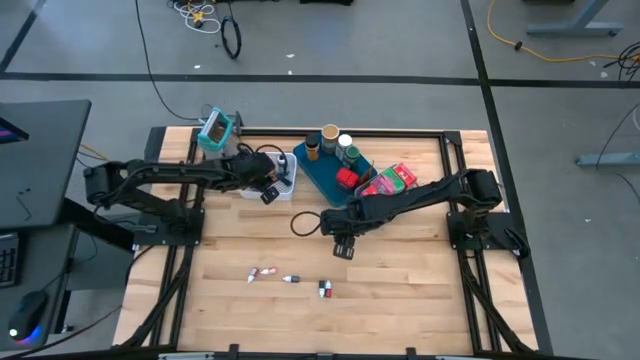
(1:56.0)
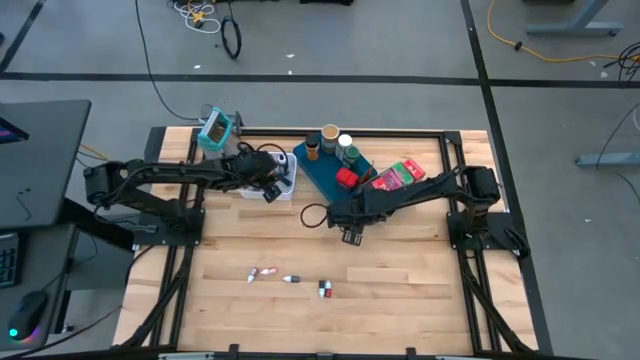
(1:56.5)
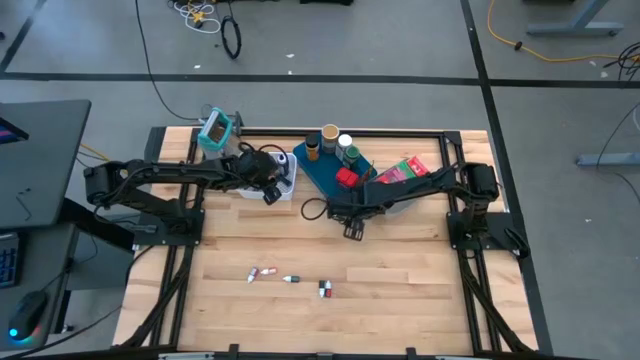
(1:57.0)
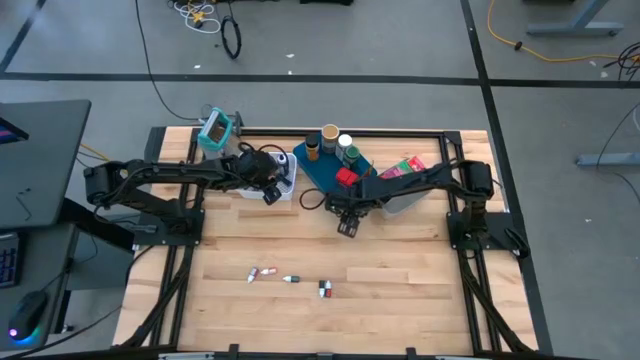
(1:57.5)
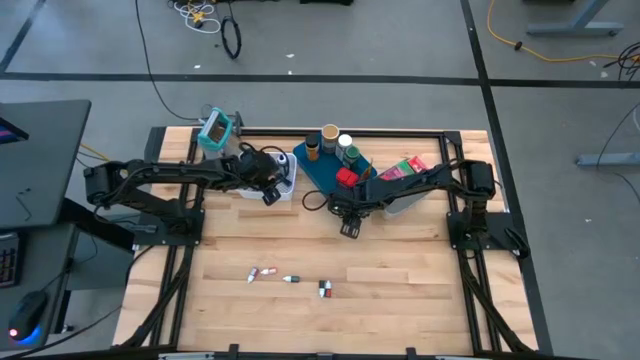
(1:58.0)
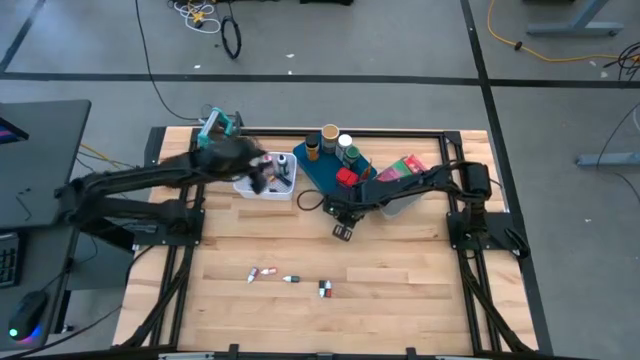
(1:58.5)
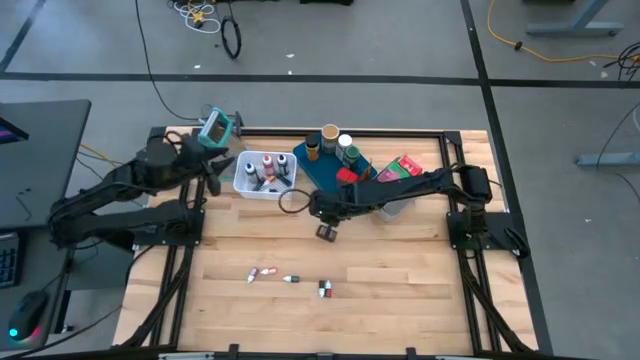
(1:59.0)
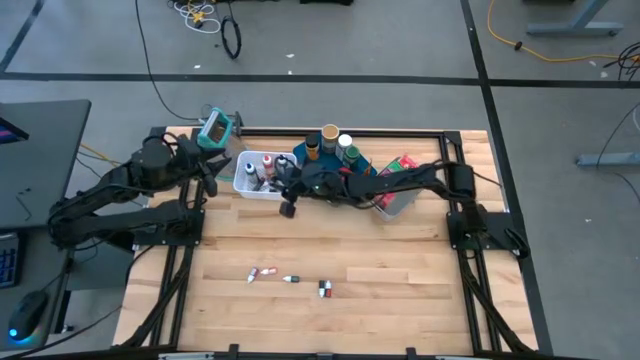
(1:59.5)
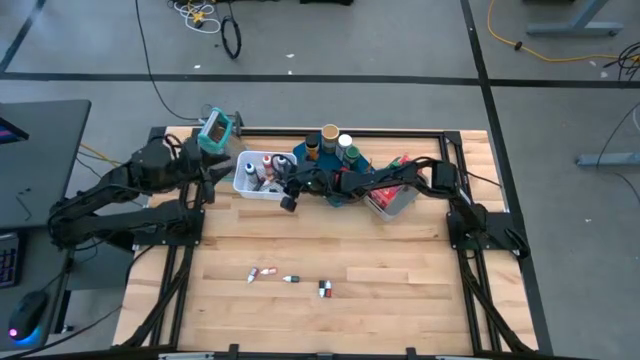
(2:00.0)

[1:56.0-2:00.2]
Task: Pick & Place Kitchen Items
Put the brown food coloring bottle into the white bin

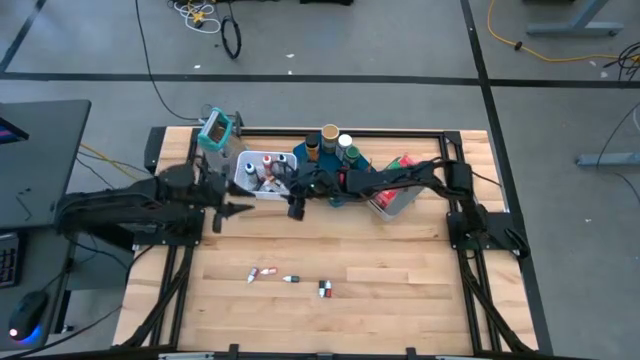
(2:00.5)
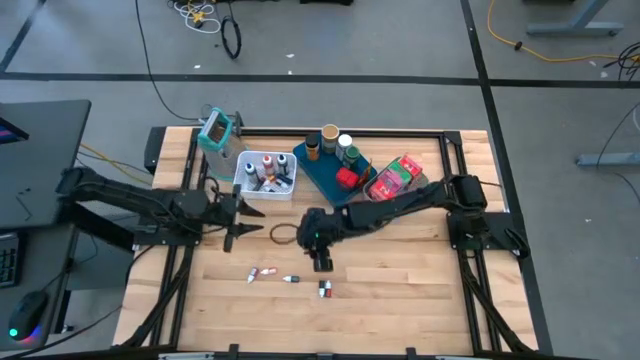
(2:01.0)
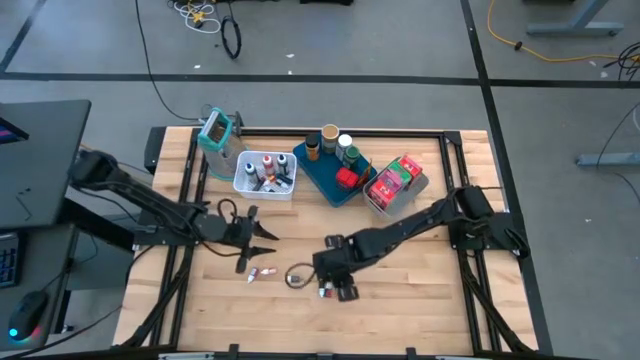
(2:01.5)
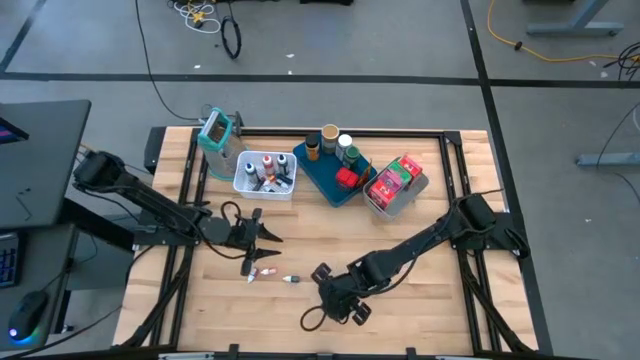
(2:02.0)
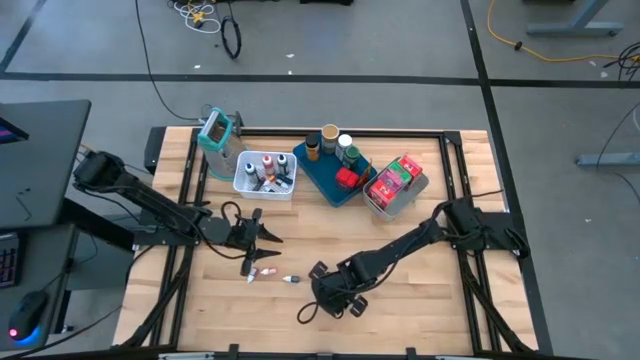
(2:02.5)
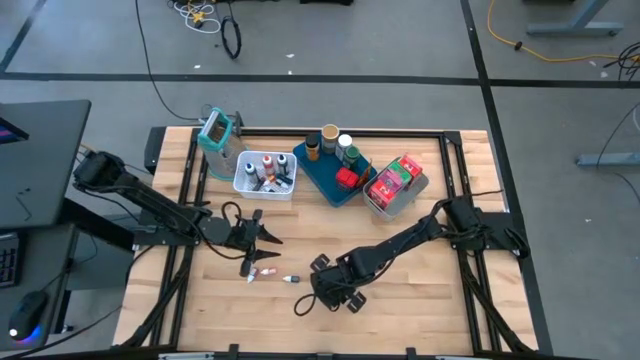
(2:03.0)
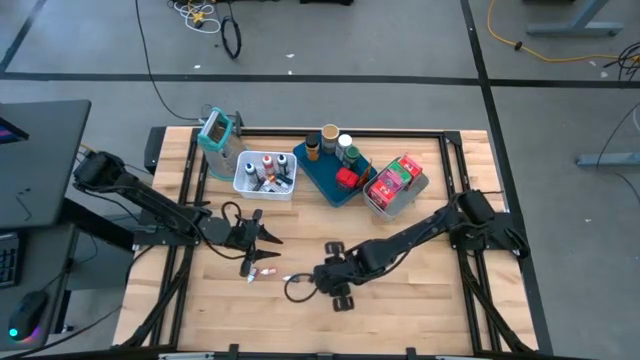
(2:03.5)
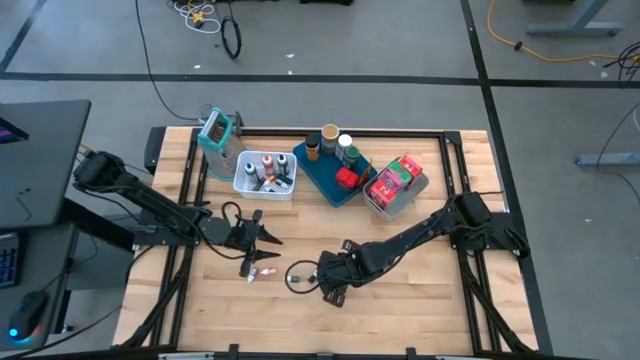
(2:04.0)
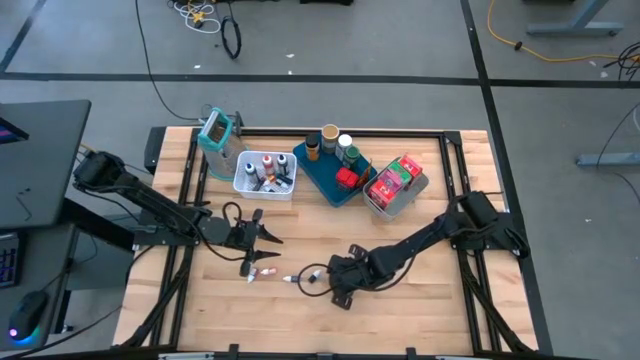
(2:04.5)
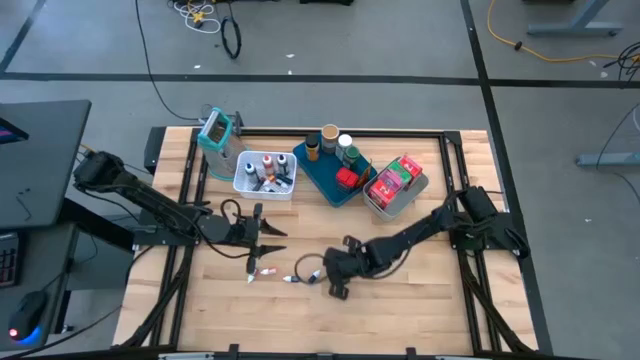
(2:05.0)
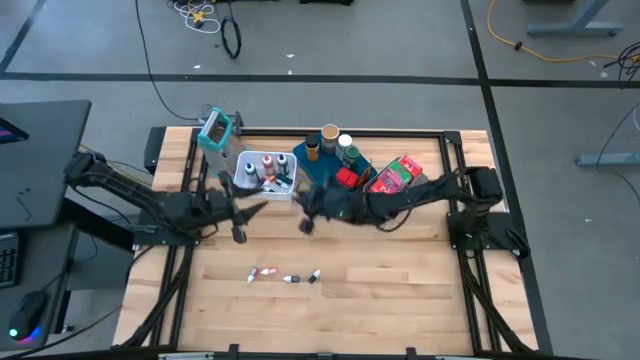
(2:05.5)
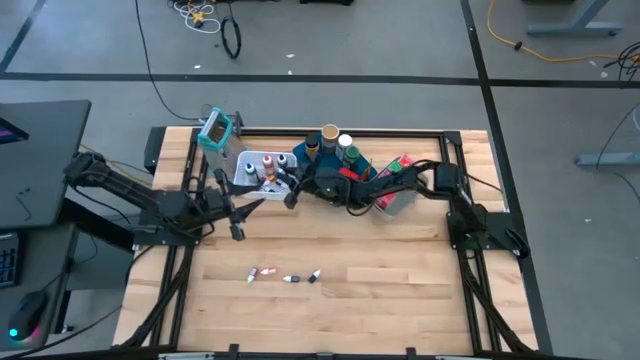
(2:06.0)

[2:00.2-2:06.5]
Put the red food coloring bottle into the white bin

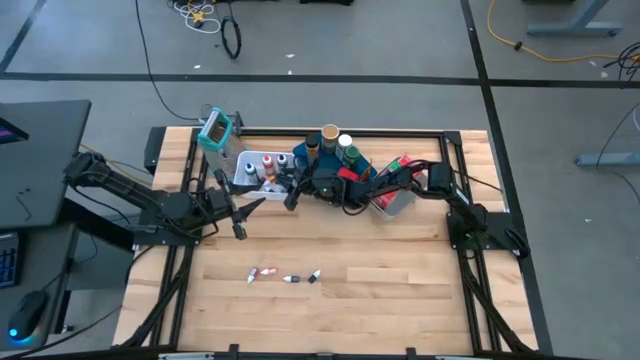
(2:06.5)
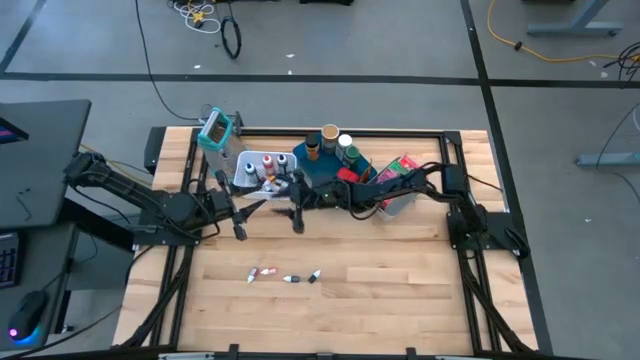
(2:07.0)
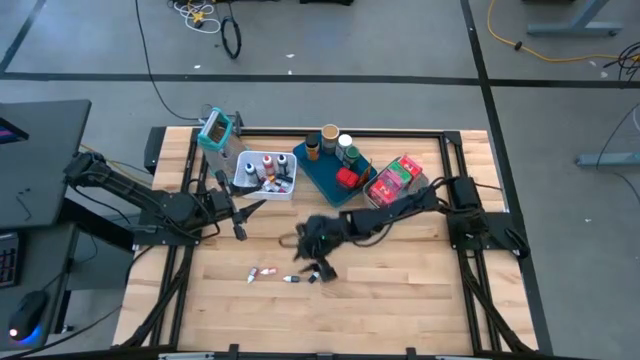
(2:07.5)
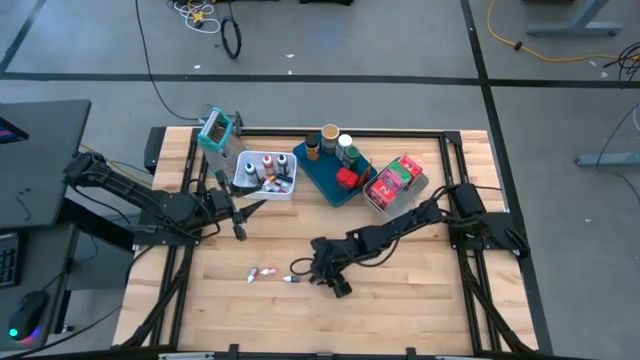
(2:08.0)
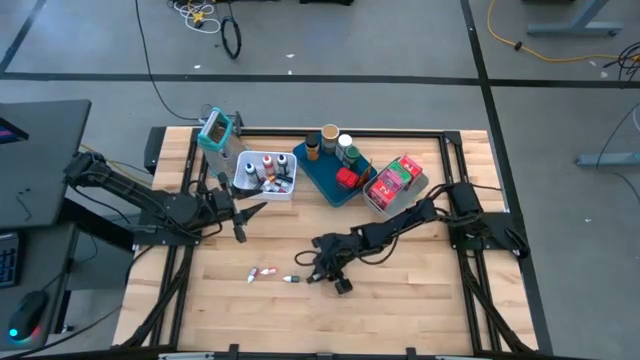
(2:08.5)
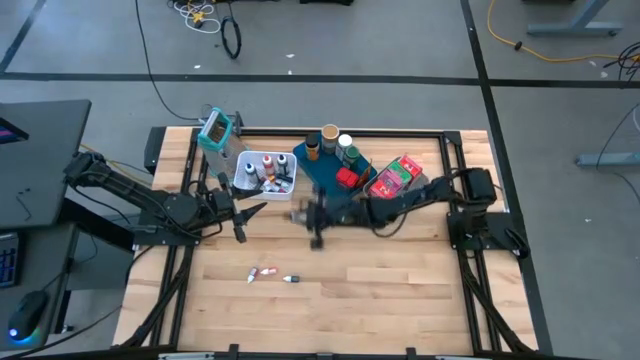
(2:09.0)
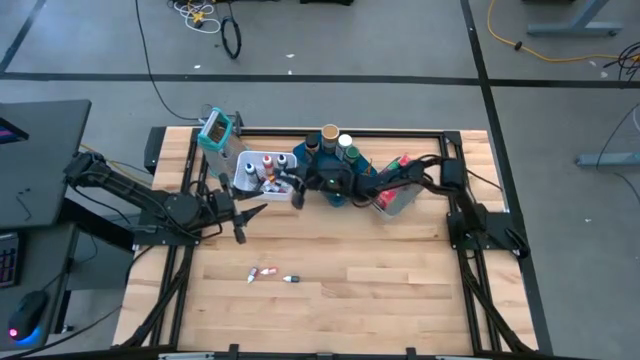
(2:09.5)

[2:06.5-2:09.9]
Put the green food coloring bottle into the white bin

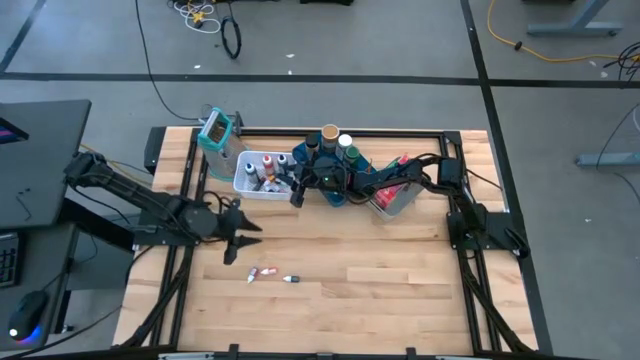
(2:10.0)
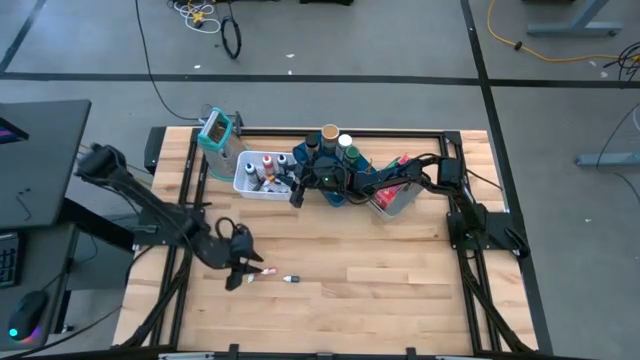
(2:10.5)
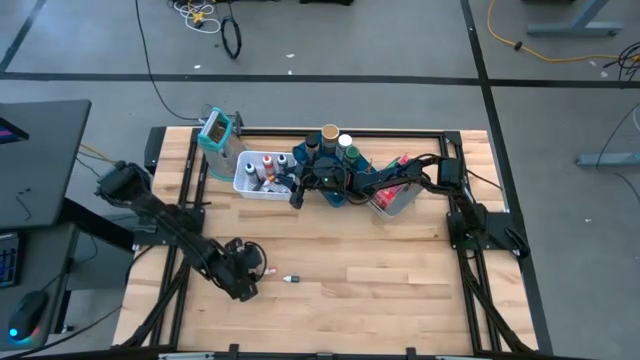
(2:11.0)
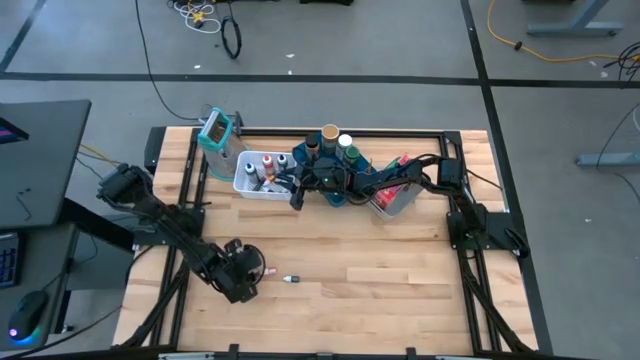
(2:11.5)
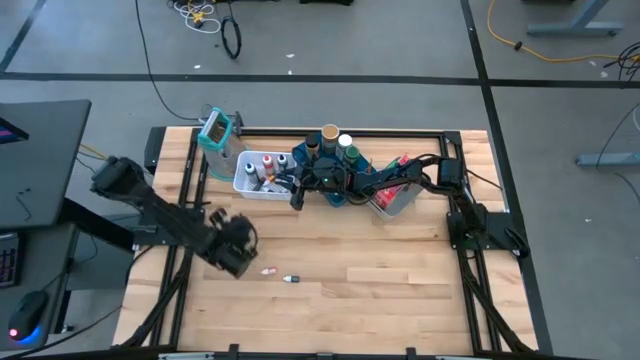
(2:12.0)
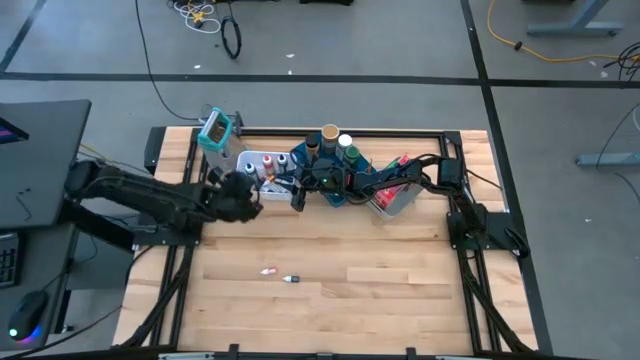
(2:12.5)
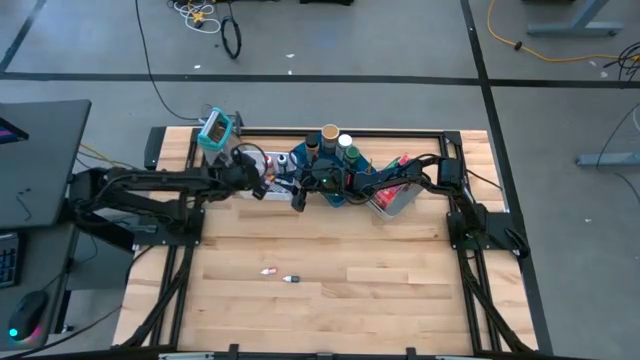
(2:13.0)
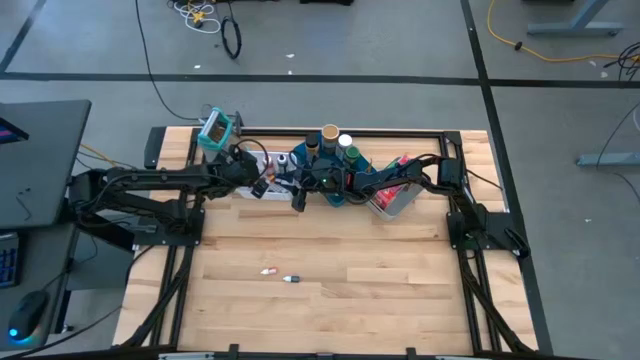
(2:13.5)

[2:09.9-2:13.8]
Put the pink food coloring bottle into the white bin

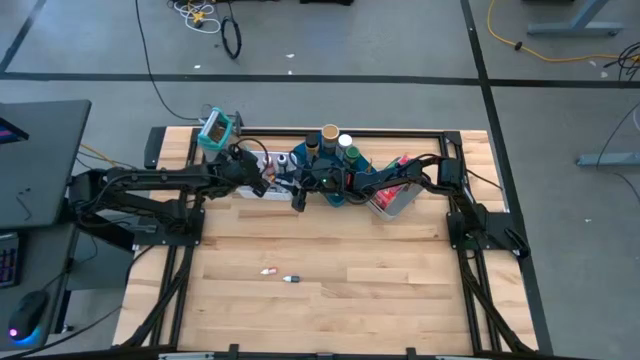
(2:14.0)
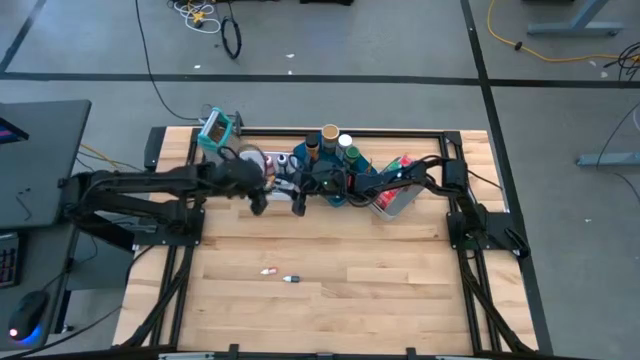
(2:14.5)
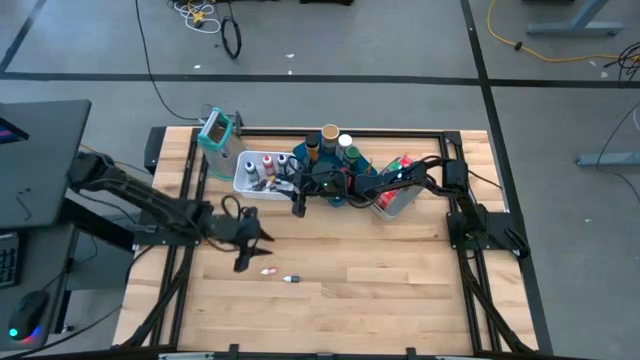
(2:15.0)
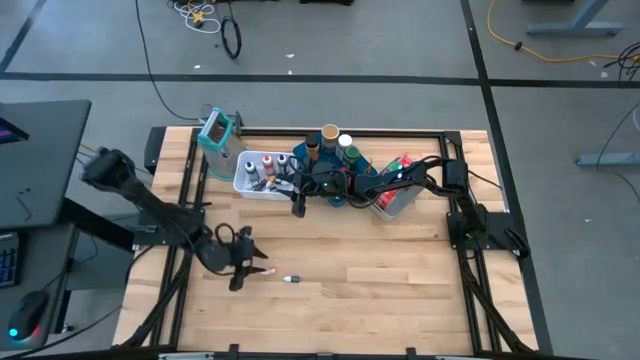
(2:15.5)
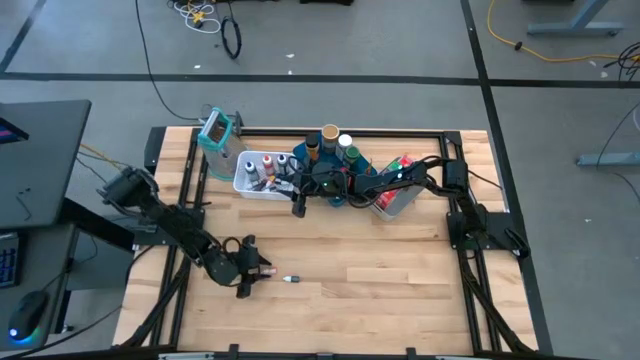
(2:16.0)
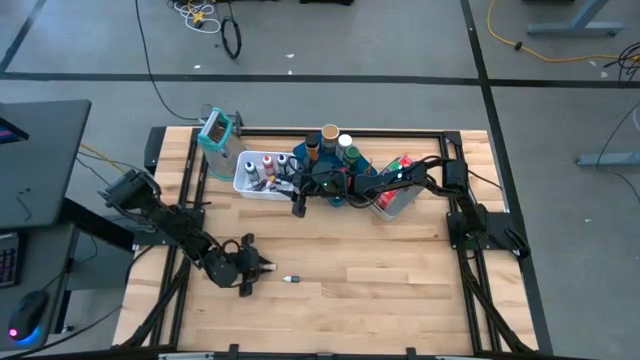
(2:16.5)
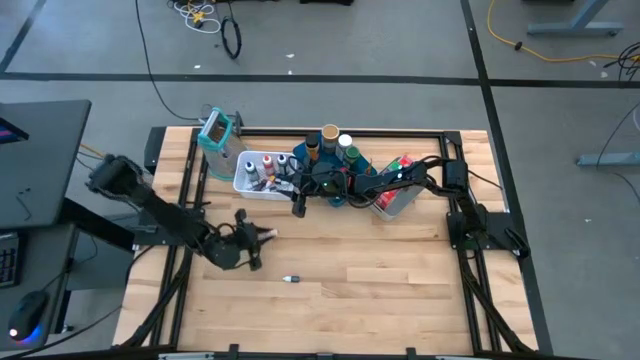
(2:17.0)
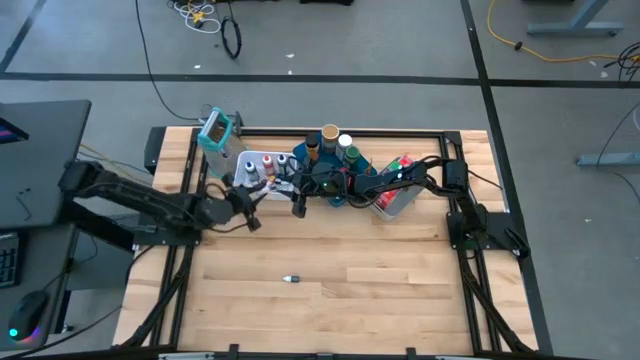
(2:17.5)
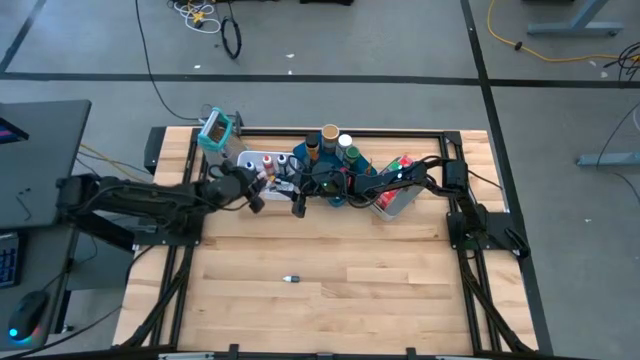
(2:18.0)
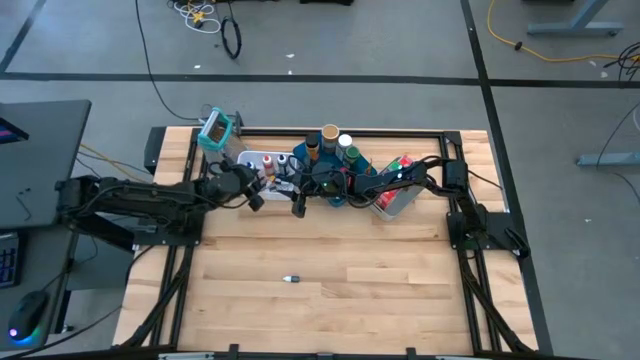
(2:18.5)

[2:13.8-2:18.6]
Put the yellow food coloring bottle into the white bin
